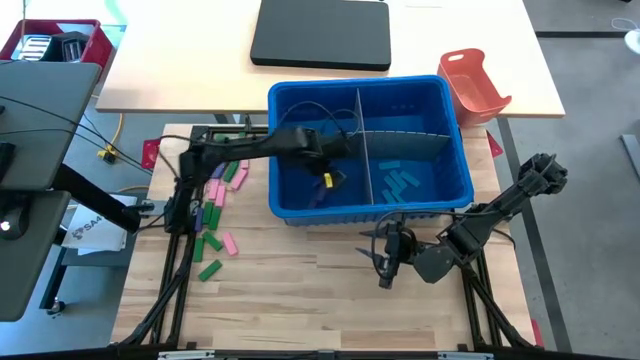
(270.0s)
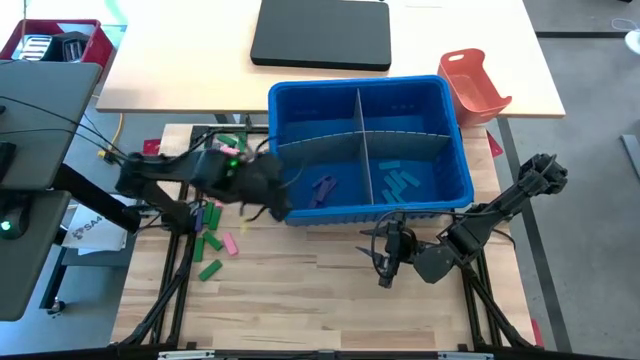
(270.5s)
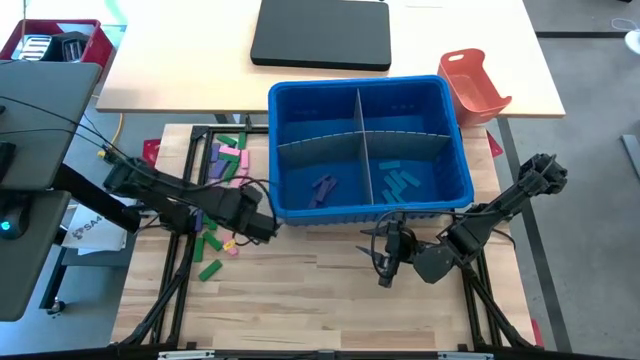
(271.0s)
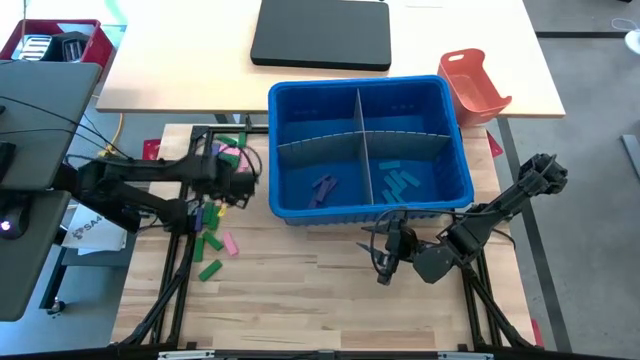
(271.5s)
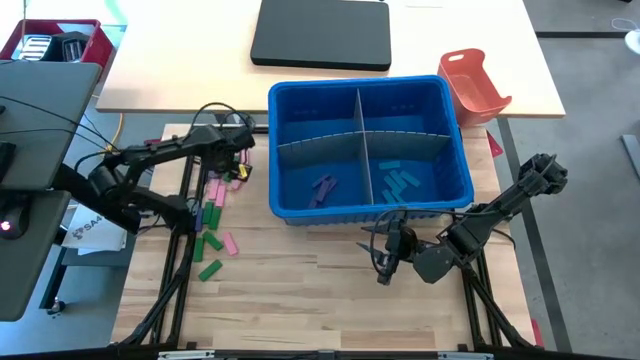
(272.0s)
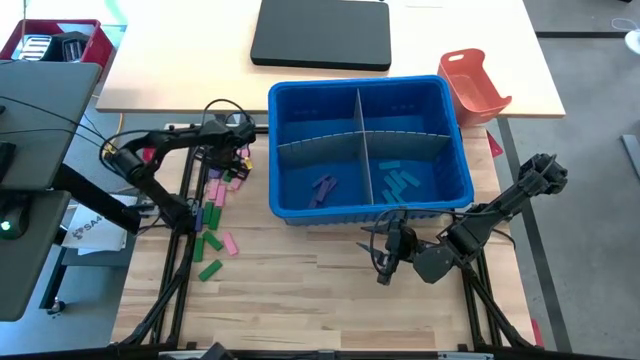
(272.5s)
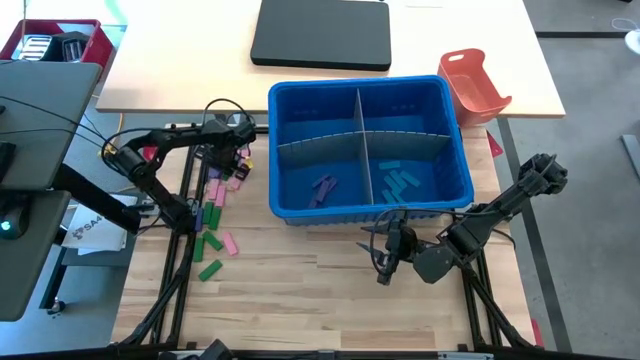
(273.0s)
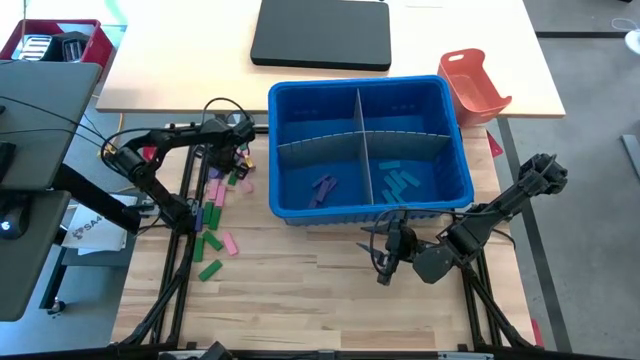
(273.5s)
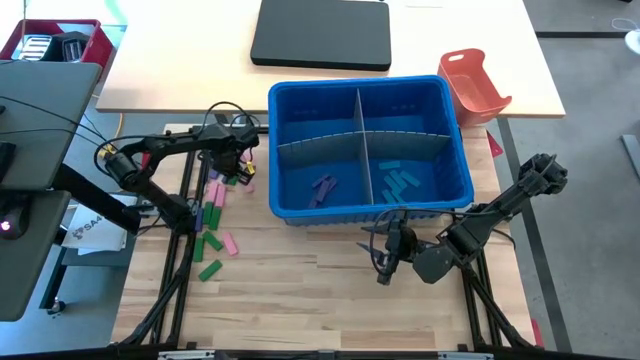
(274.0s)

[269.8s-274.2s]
Task: Sort blocks
Put the purple block into the blue bin with the other purple block

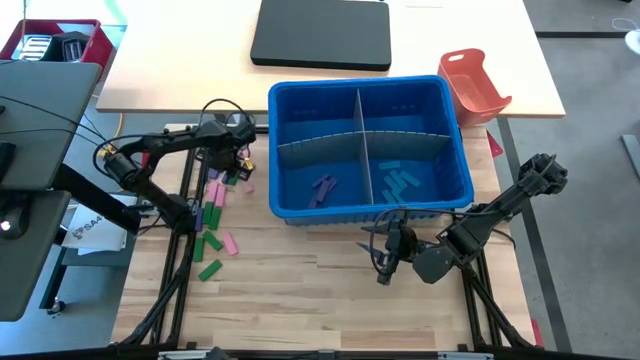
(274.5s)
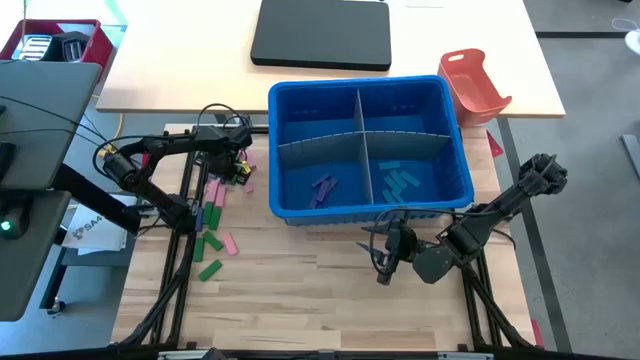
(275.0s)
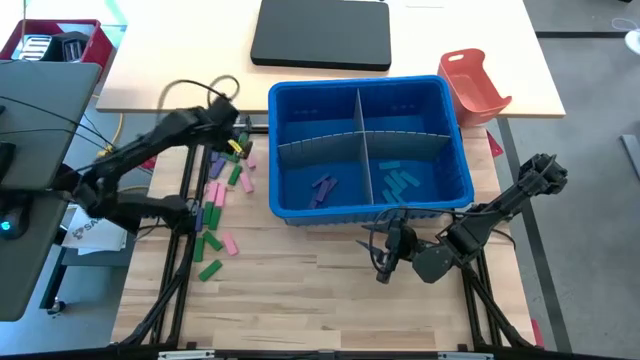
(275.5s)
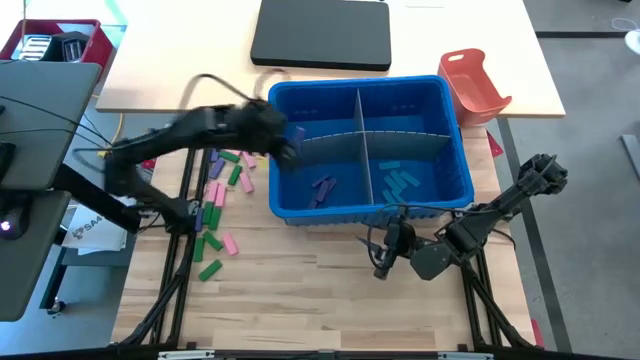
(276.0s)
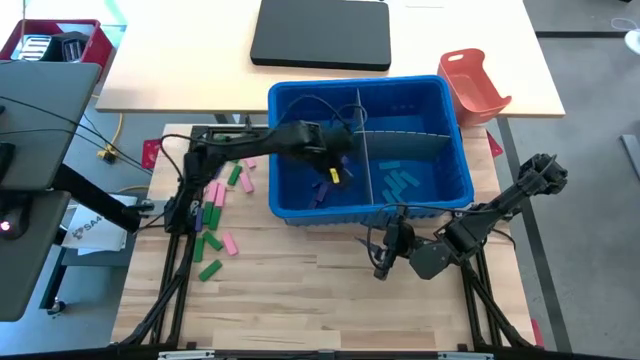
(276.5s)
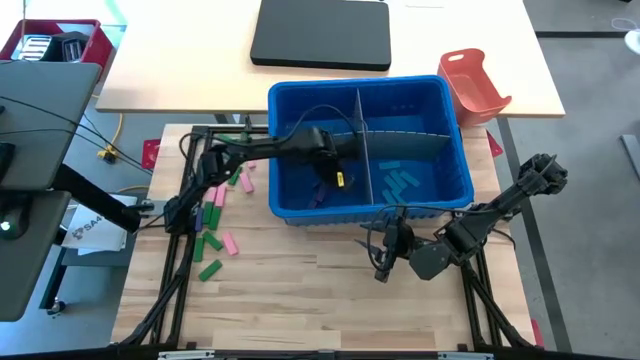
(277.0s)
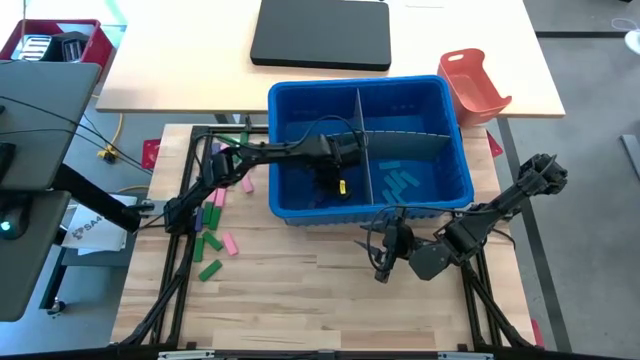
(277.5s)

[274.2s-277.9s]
Put the purple block into the blue bin with the other purple block

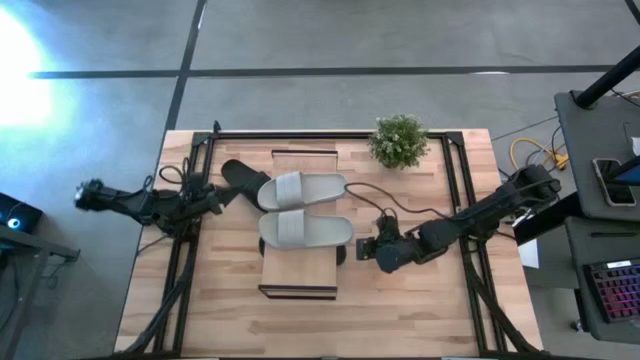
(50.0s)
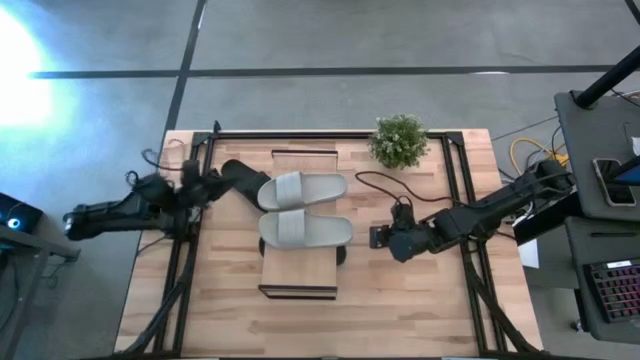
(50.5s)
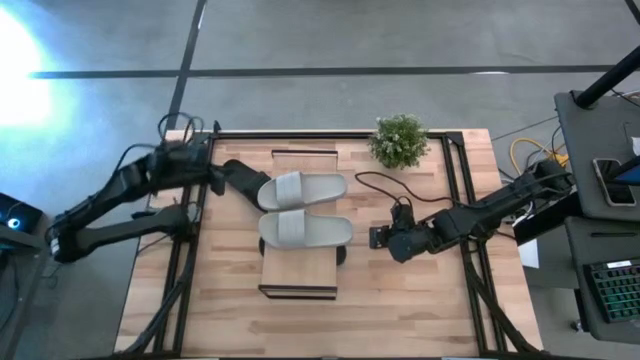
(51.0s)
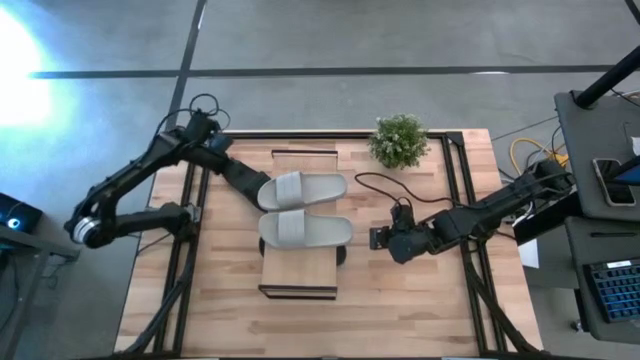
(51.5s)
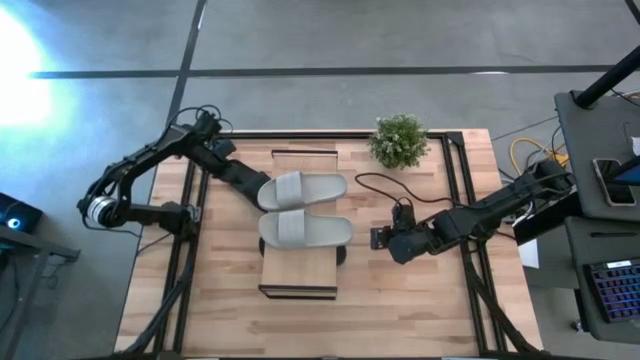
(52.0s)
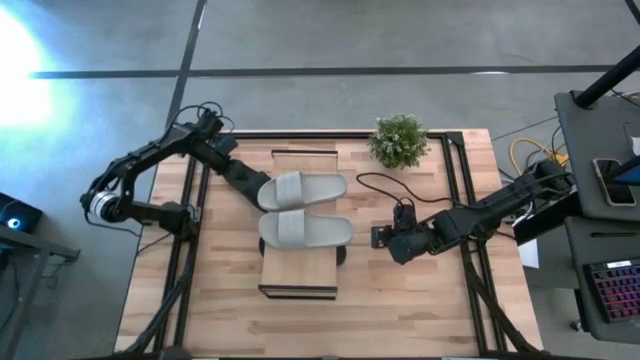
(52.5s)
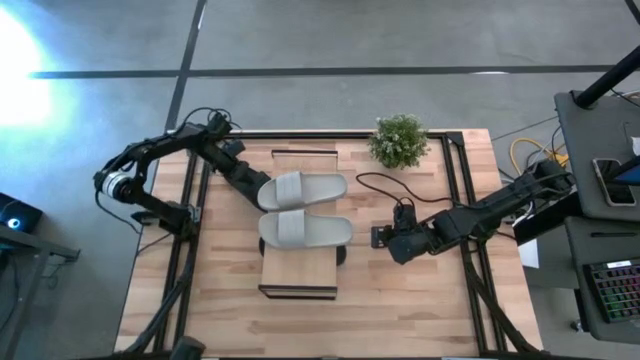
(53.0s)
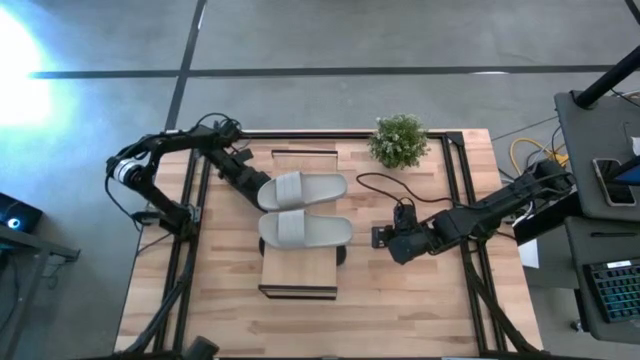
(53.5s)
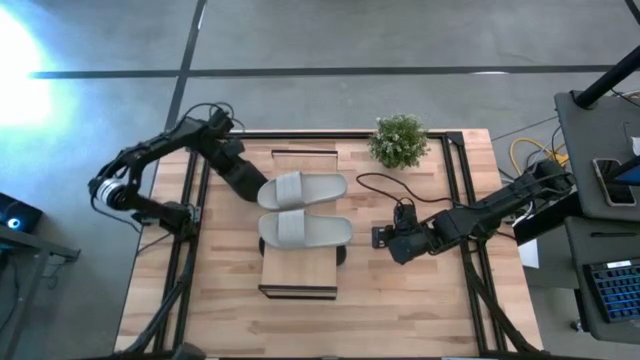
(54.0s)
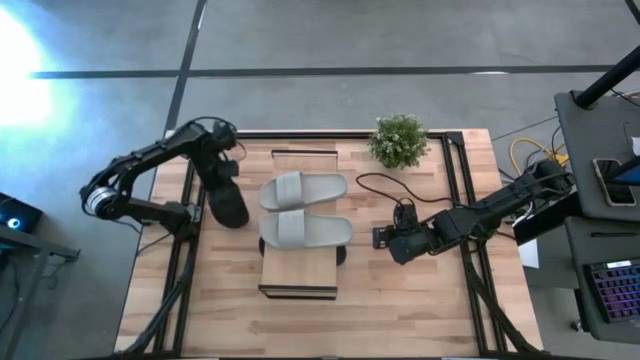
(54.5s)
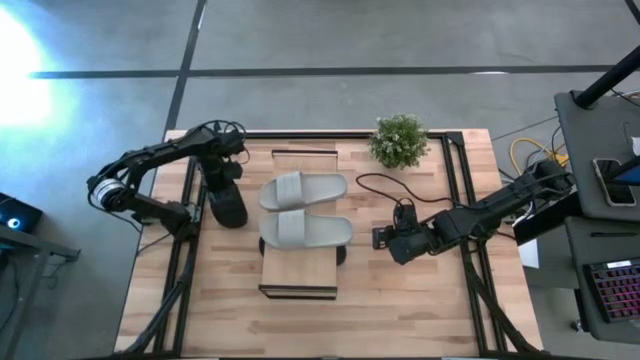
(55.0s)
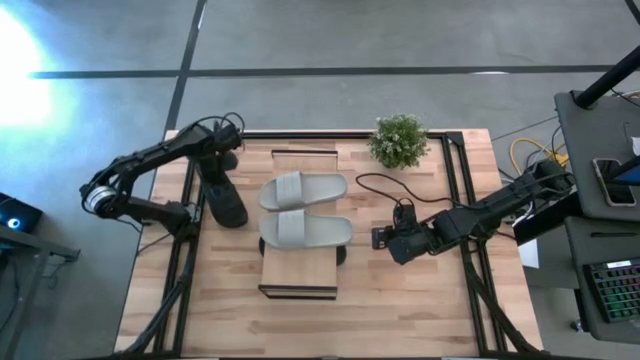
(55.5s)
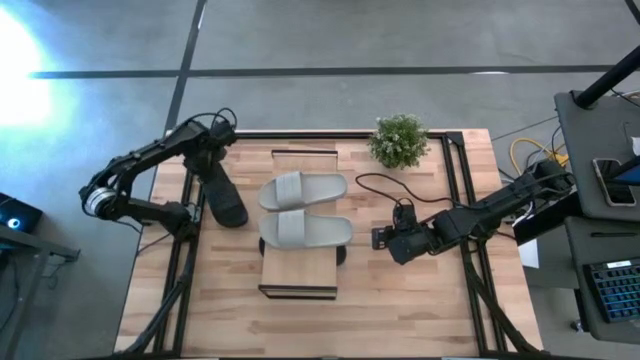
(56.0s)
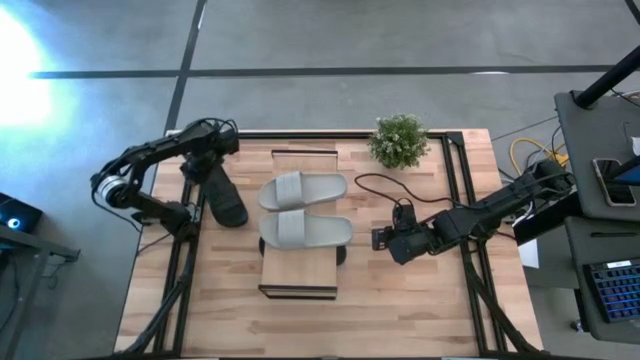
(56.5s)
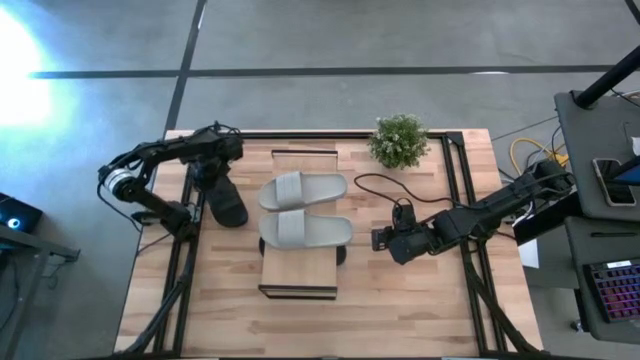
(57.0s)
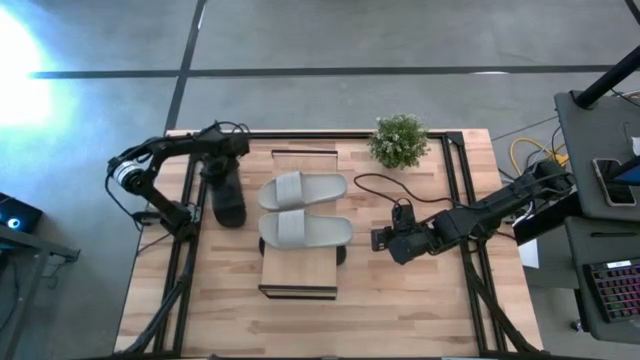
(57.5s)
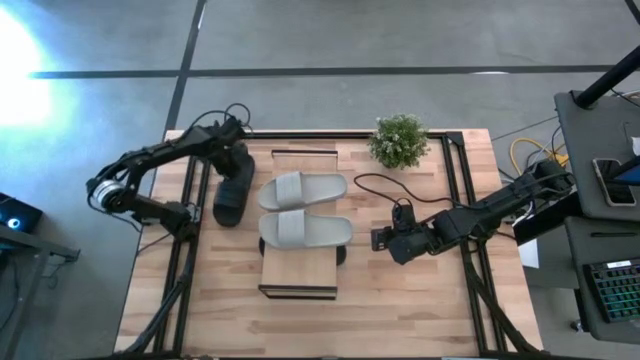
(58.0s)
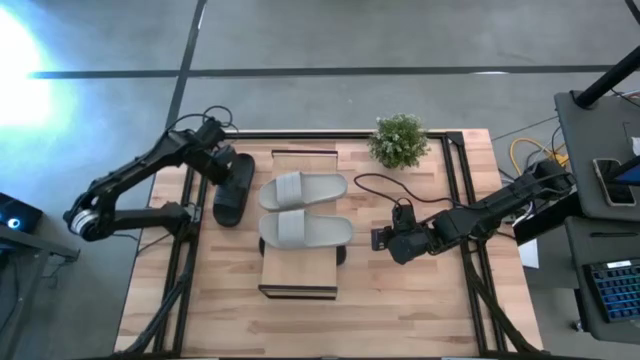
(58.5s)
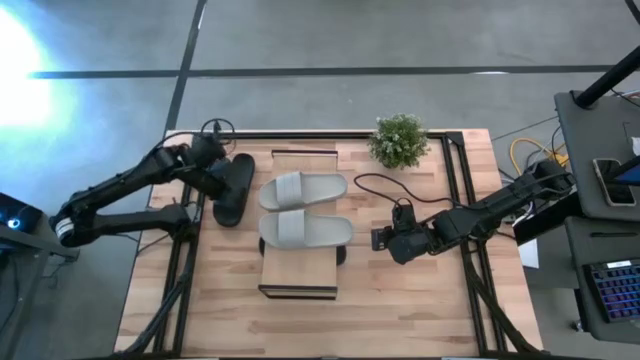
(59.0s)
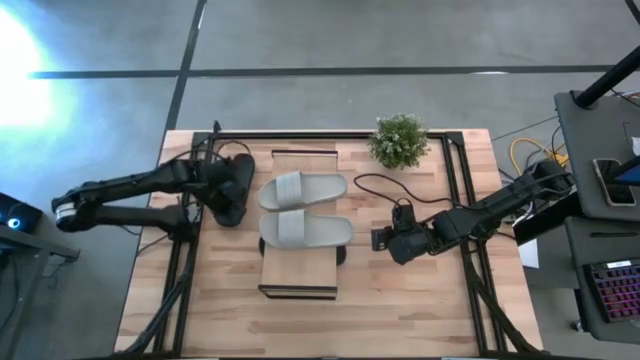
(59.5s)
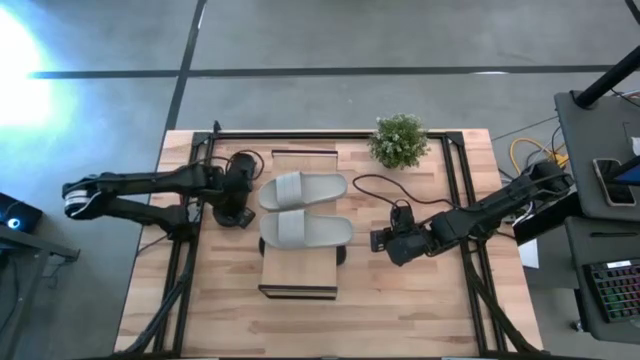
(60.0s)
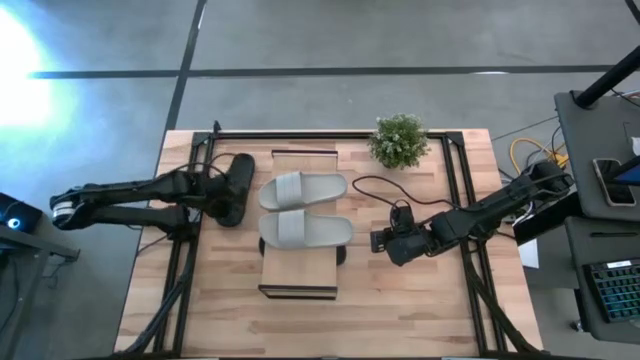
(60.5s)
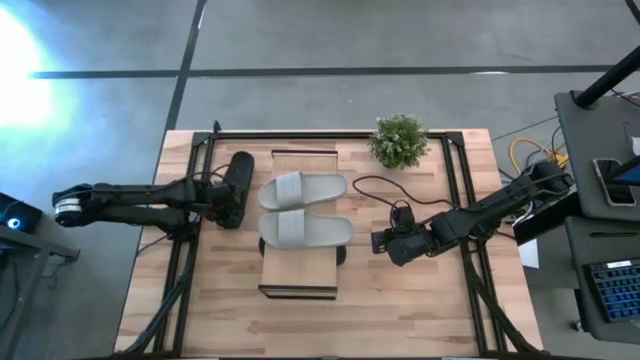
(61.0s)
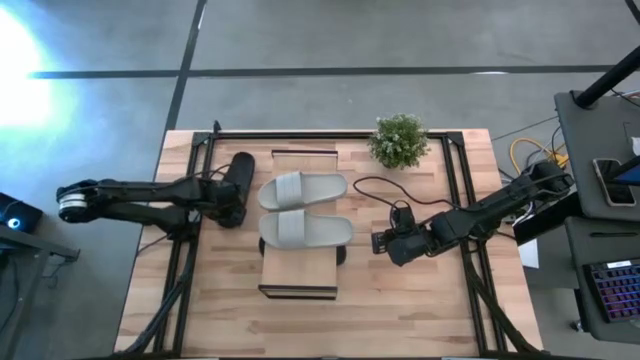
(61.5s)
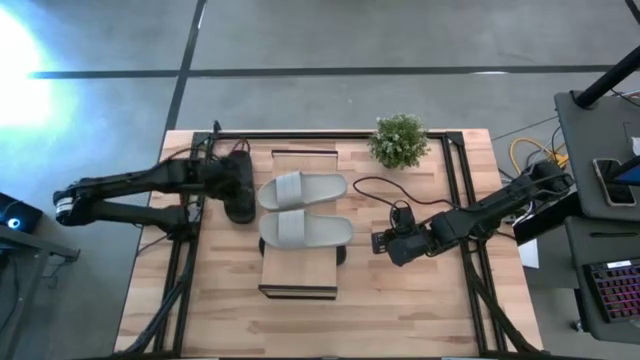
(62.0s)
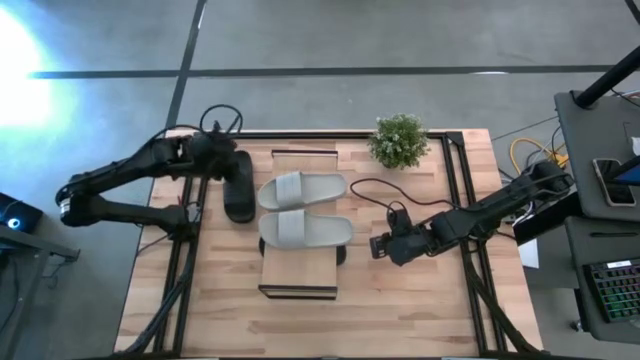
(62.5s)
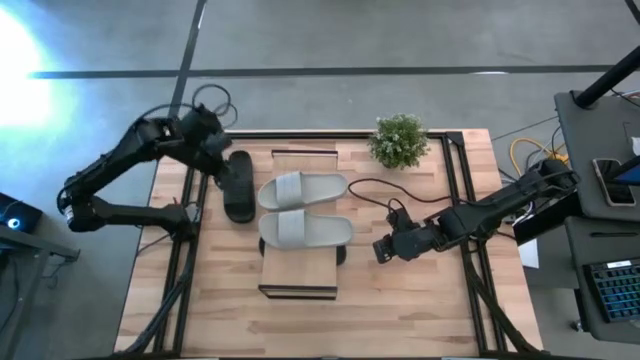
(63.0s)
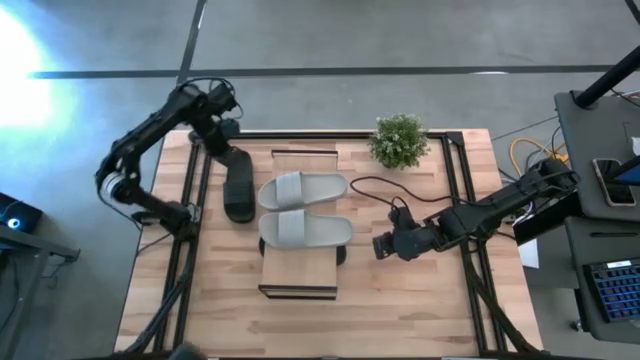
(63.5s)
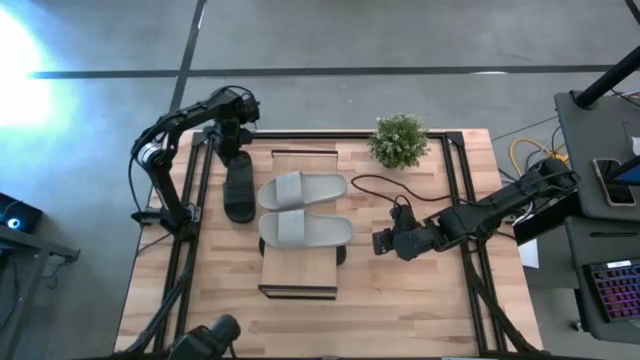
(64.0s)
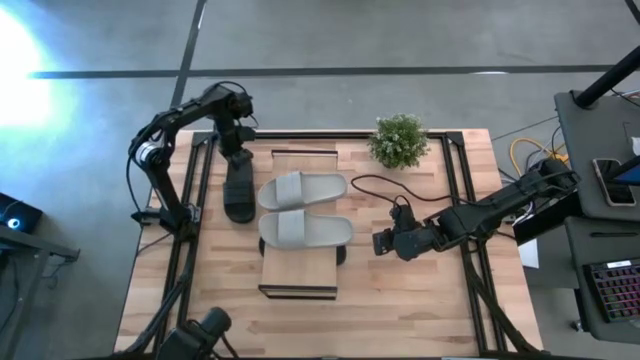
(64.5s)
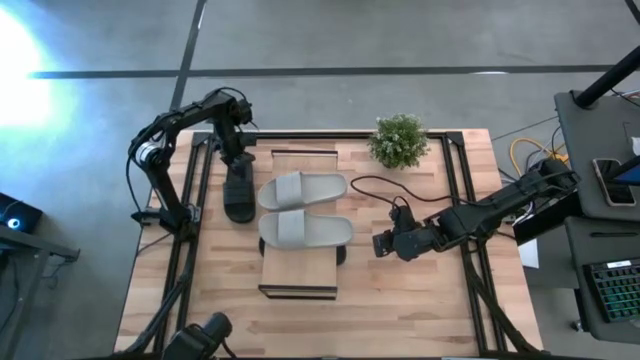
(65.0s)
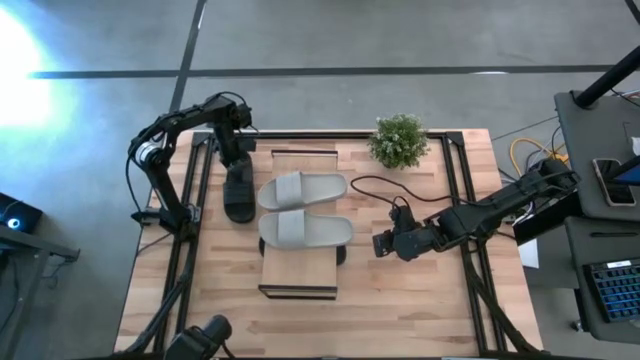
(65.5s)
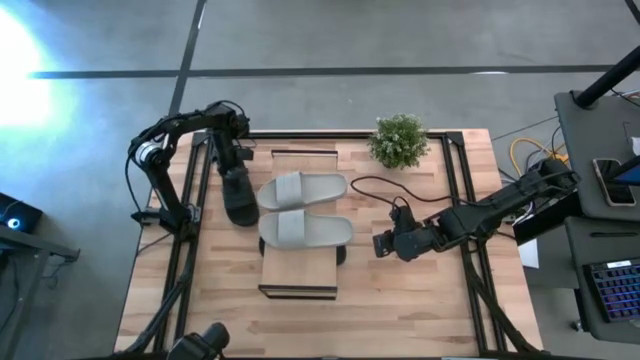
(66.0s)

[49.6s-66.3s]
Task: Pick and place slides into the shelf
Move the black slide under the shelf
